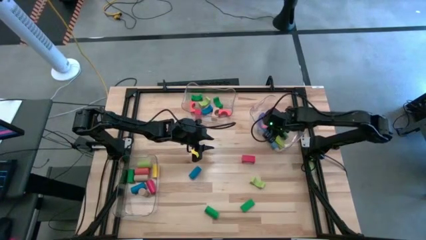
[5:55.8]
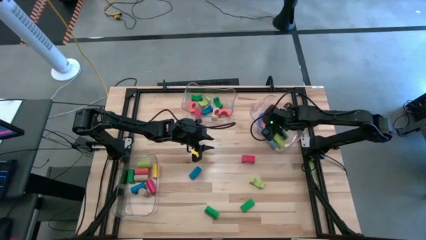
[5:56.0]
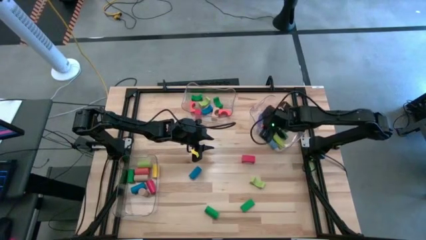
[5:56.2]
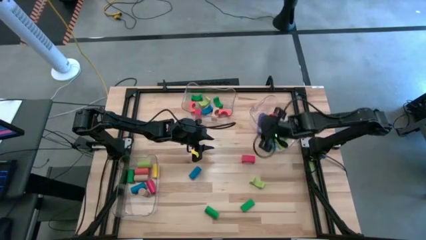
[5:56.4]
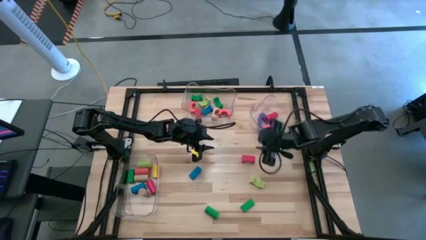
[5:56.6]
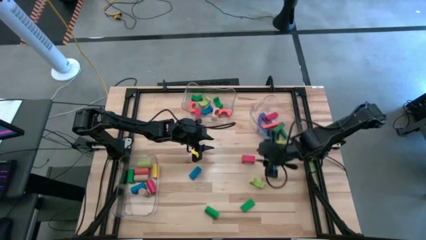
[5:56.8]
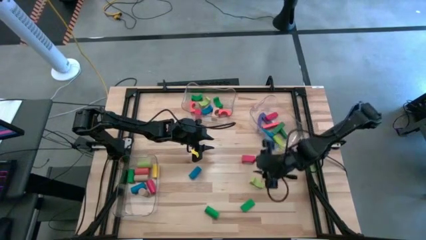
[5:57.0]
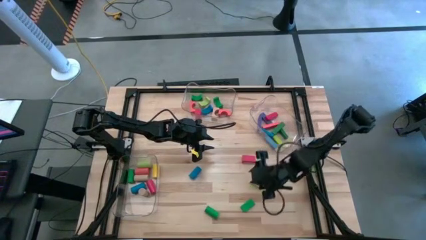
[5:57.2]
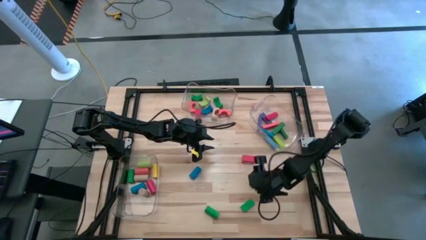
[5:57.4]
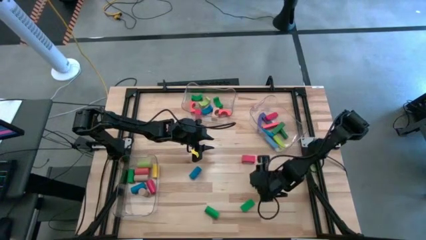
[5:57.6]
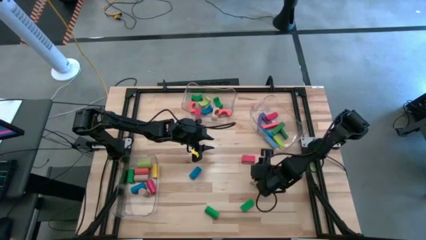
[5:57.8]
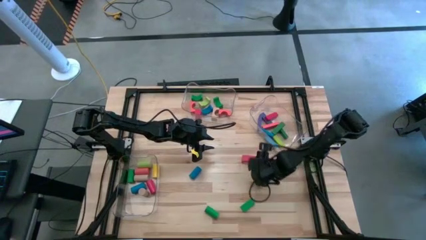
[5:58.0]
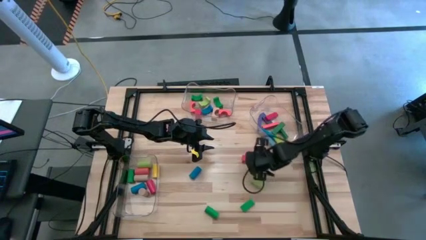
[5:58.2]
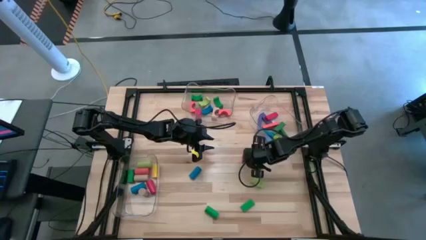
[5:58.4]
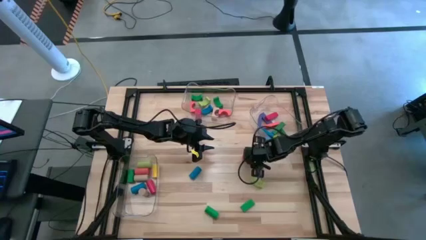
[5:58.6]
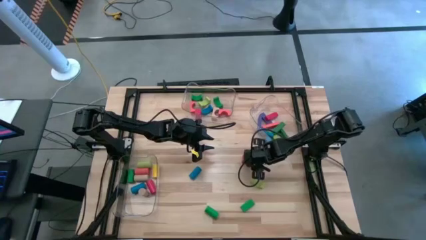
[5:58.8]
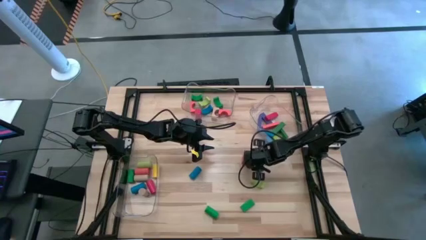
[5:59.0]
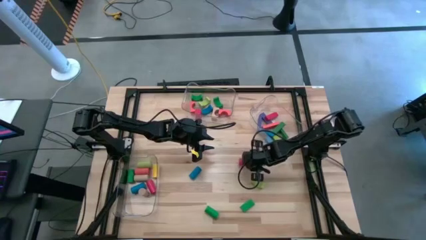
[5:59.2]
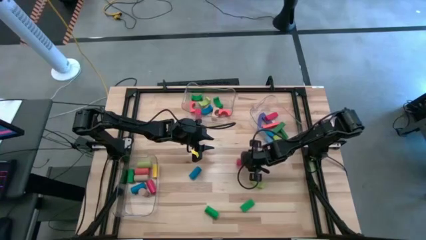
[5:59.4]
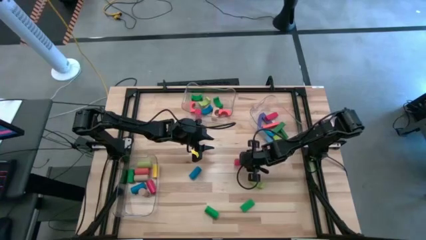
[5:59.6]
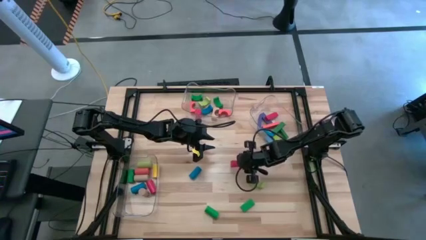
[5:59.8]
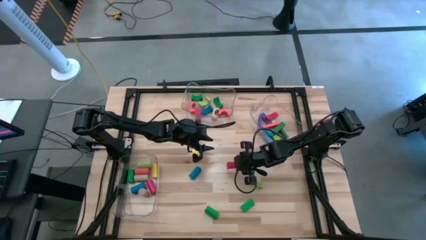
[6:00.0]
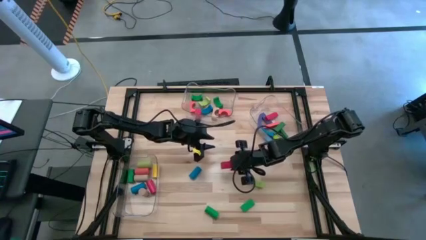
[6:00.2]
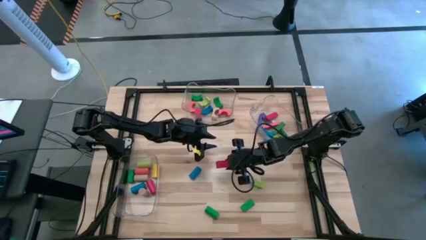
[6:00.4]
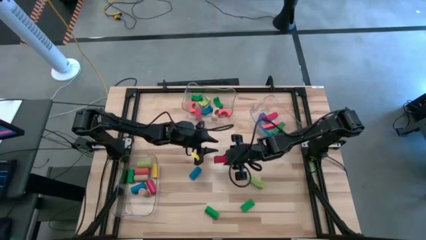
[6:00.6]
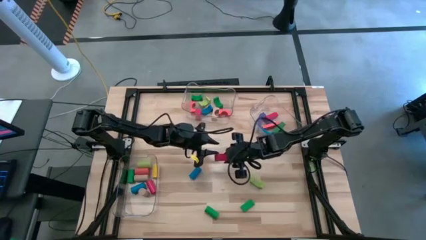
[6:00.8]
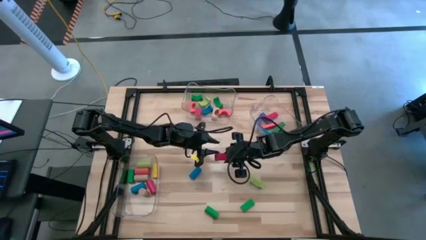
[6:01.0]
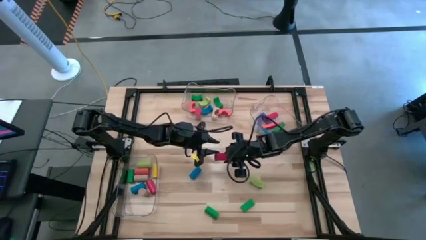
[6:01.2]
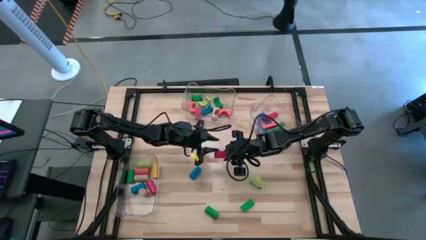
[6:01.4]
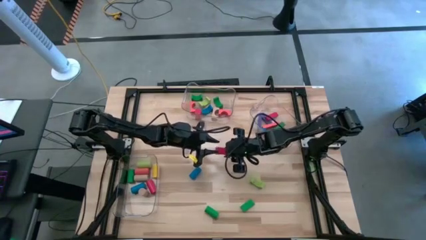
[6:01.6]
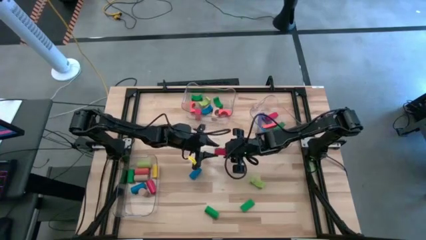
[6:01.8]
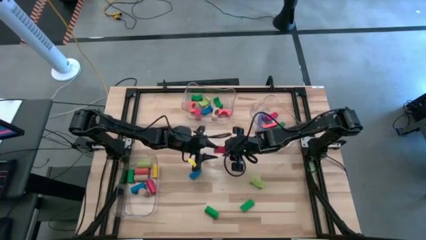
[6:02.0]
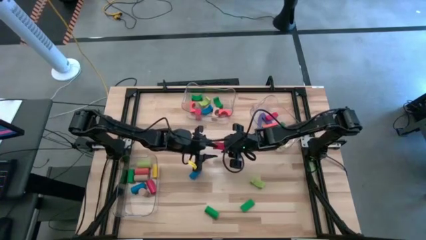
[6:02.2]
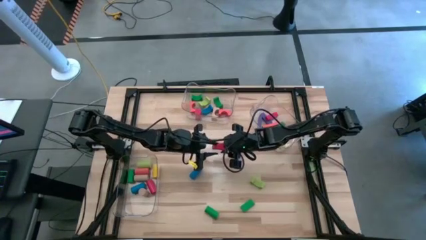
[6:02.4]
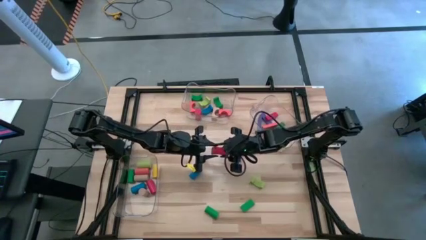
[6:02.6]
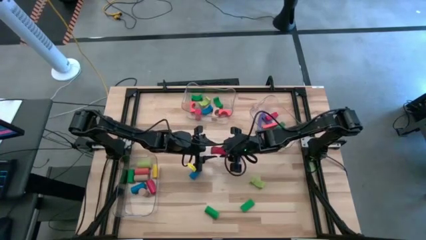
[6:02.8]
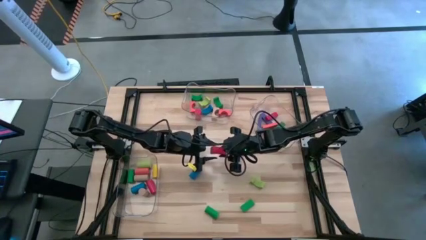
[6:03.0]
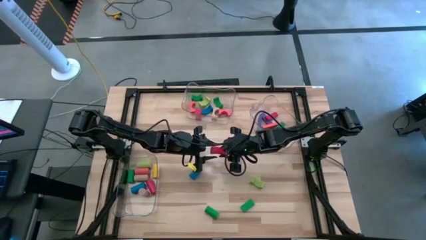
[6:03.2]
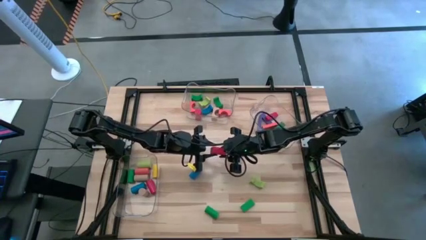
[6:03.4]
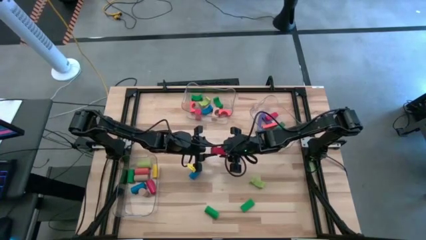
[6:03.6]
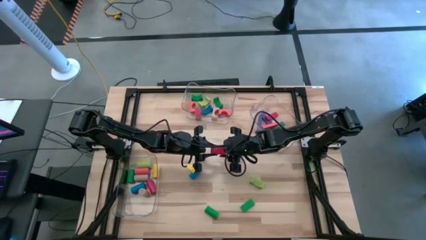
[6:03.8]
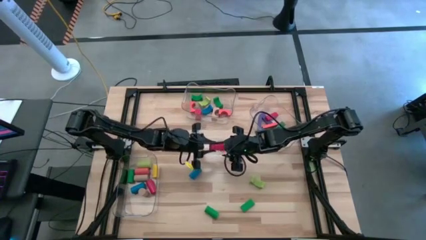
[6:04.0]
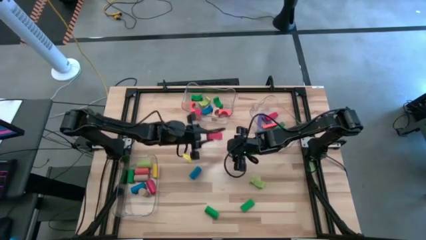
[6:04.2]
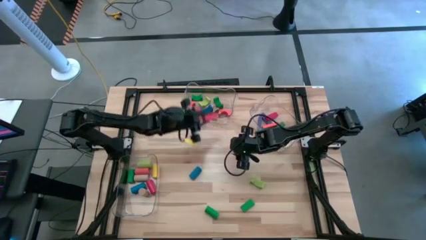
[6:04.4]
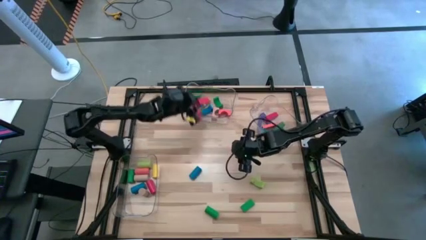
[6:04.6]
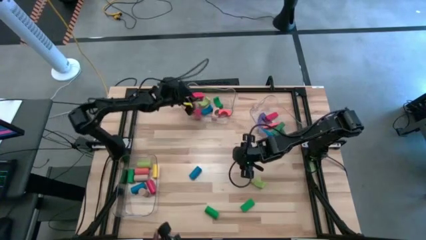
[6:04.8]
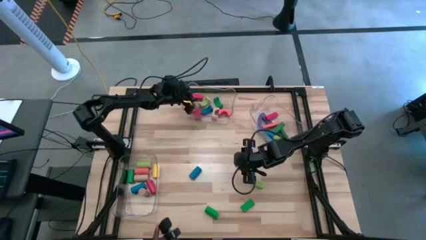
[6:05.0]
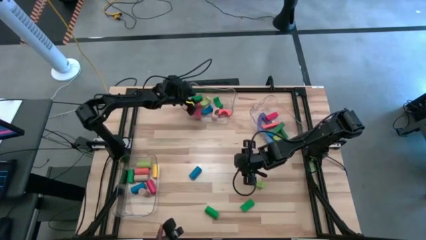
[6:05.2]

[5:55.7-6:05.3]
Task: Sort blocks by size
Put the red arch block into the middle transparent bin
